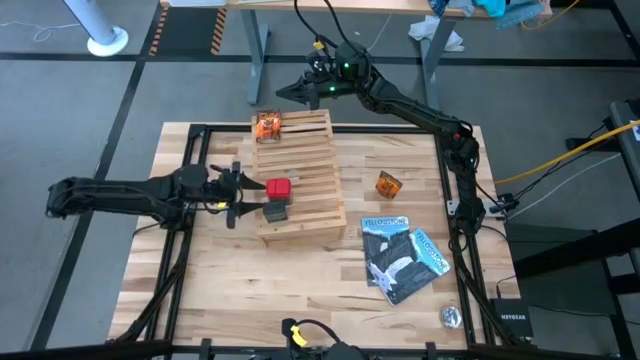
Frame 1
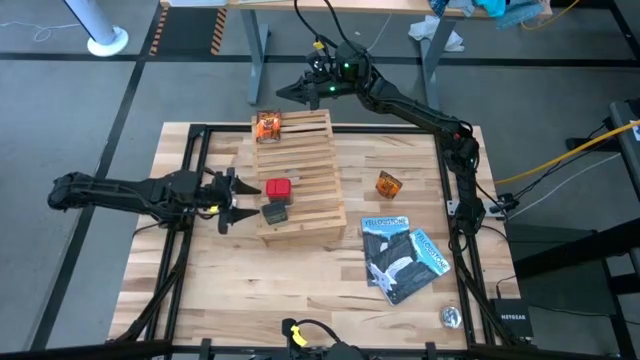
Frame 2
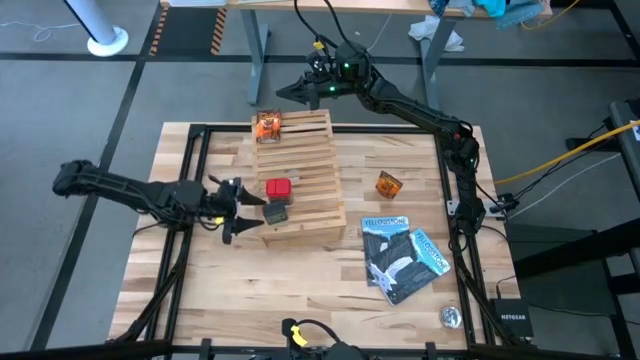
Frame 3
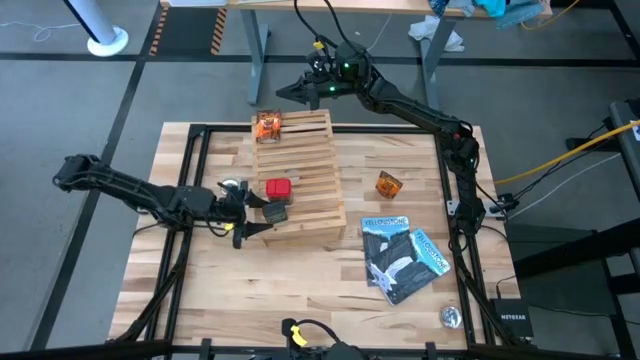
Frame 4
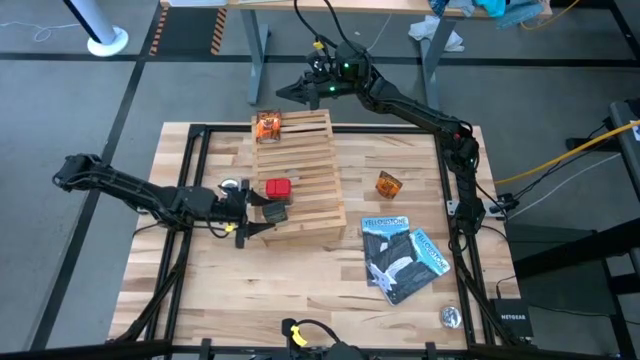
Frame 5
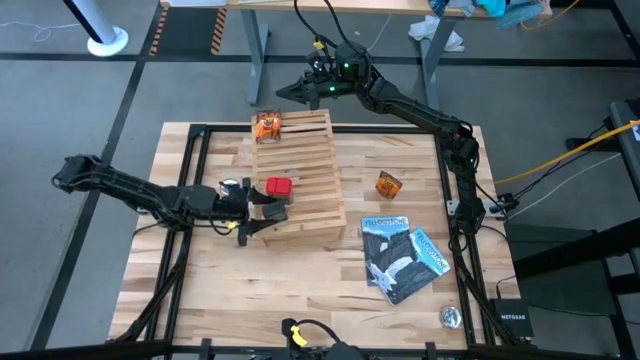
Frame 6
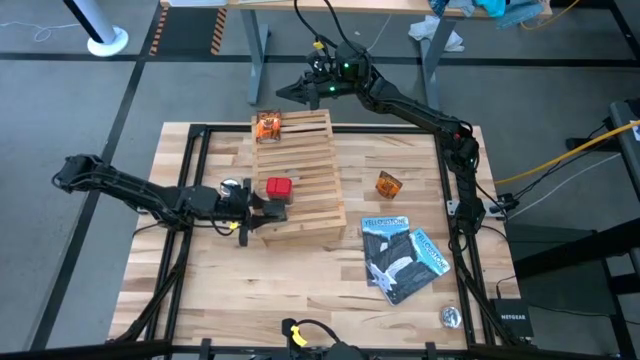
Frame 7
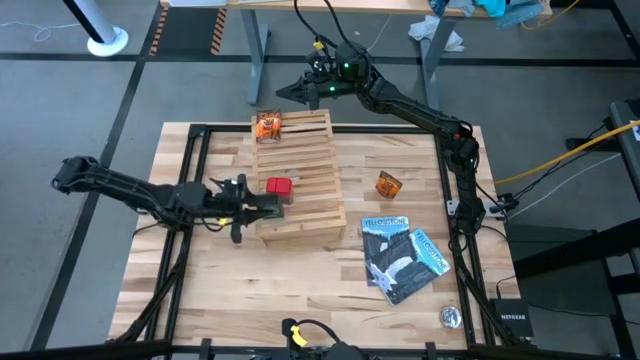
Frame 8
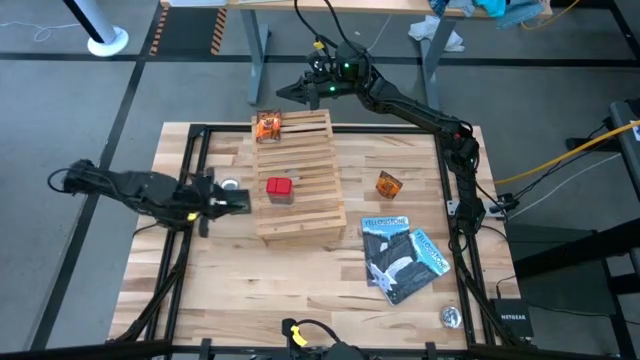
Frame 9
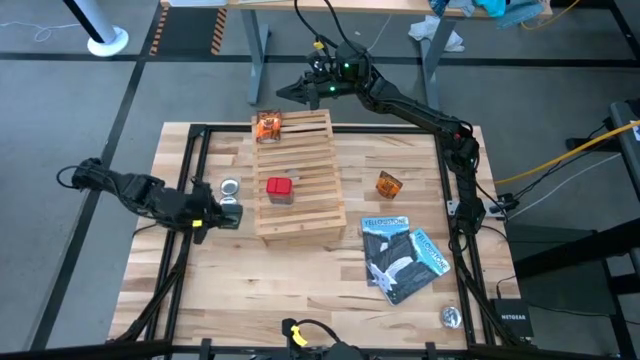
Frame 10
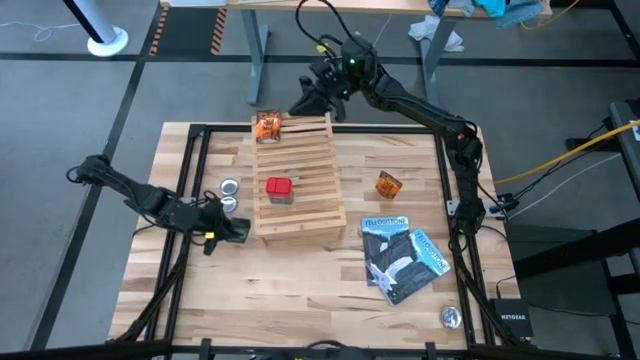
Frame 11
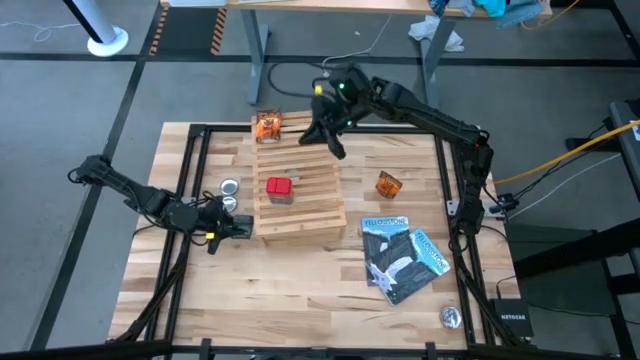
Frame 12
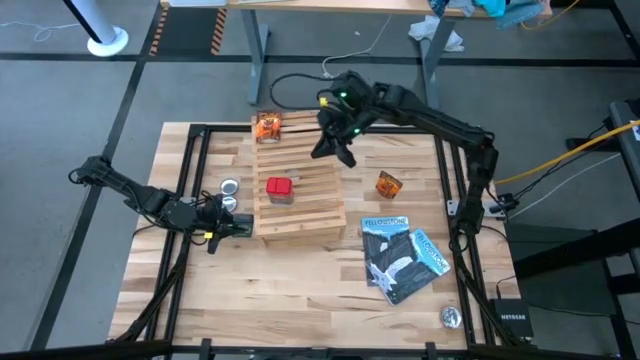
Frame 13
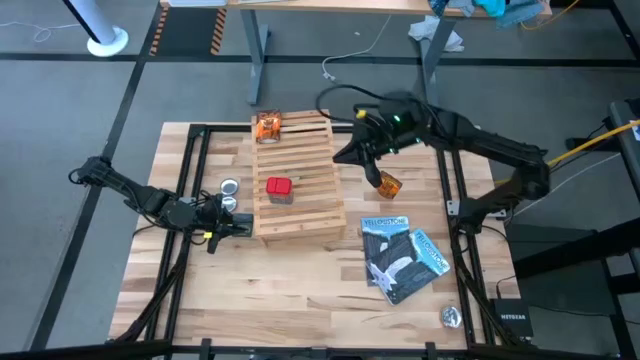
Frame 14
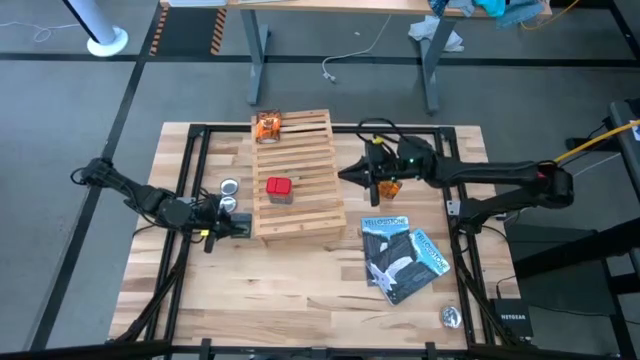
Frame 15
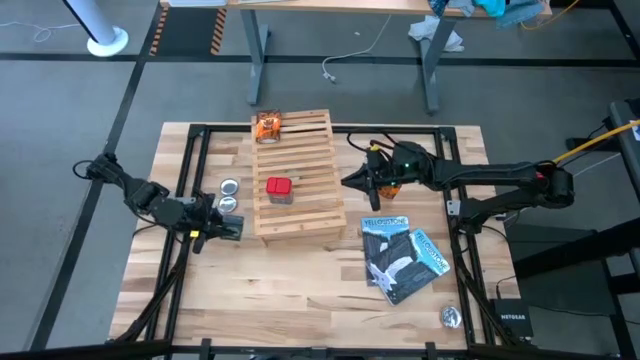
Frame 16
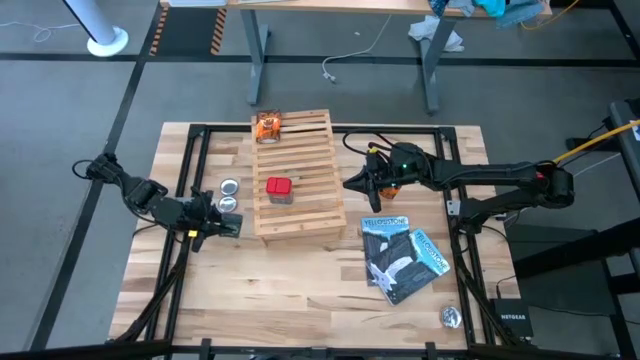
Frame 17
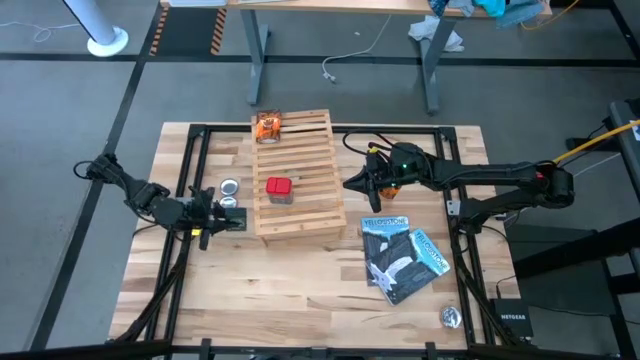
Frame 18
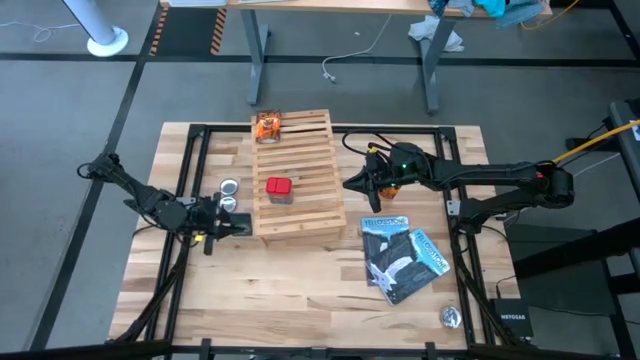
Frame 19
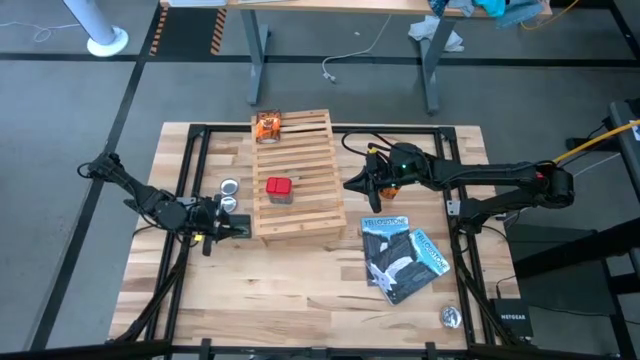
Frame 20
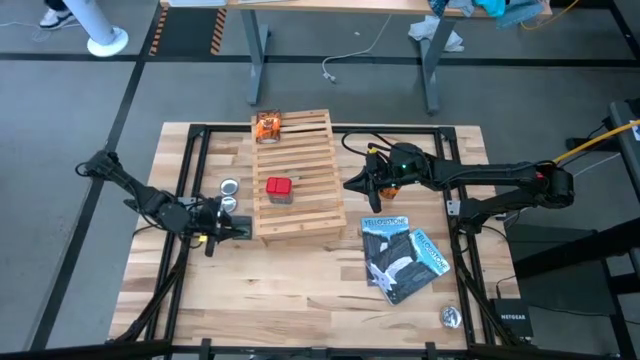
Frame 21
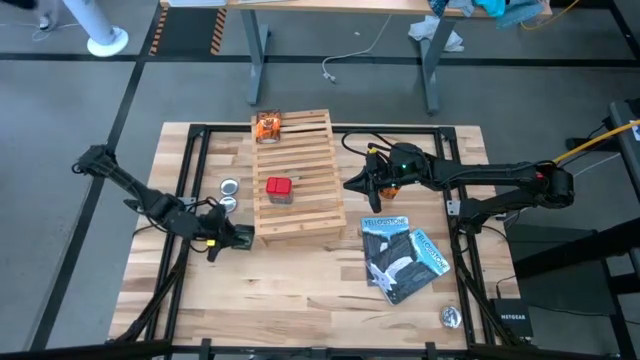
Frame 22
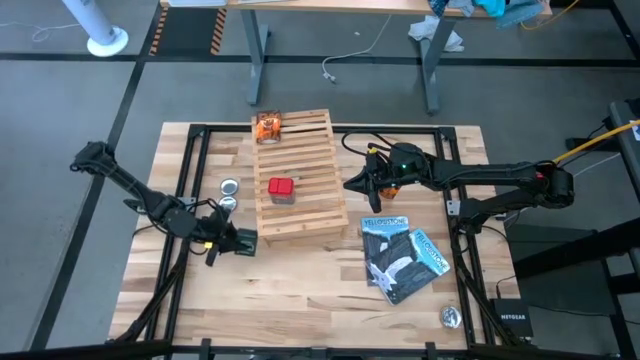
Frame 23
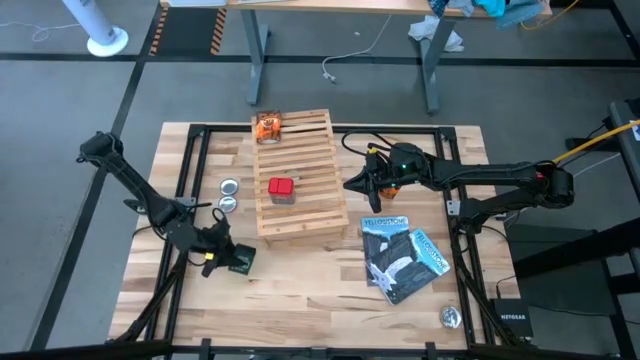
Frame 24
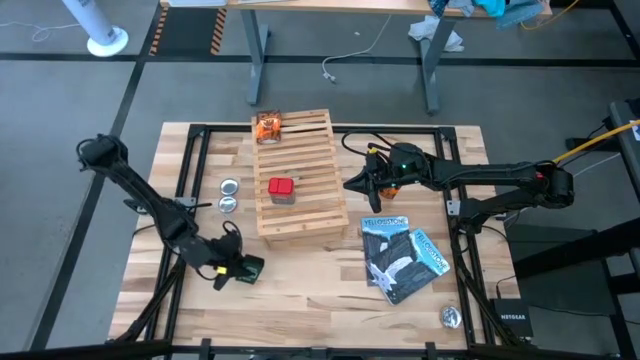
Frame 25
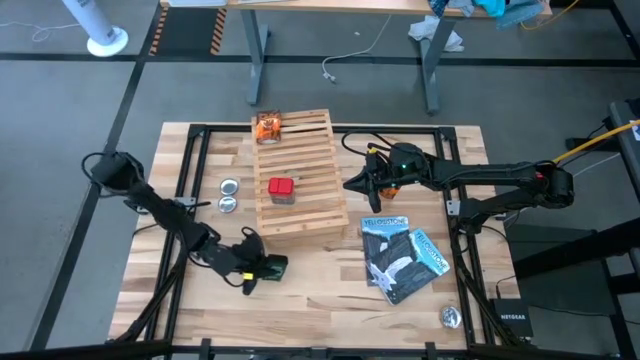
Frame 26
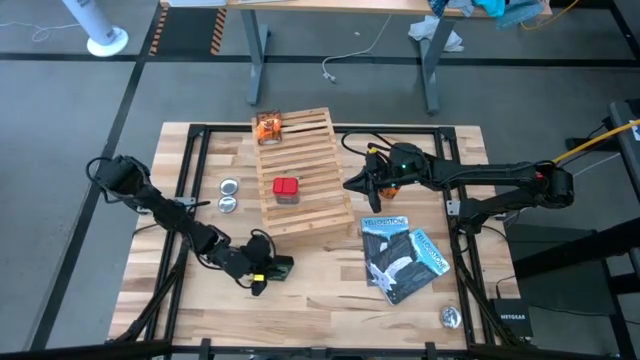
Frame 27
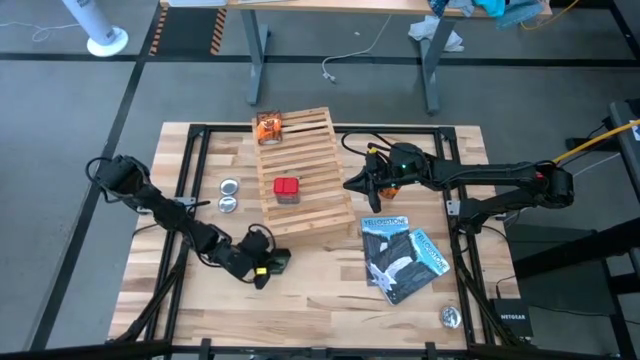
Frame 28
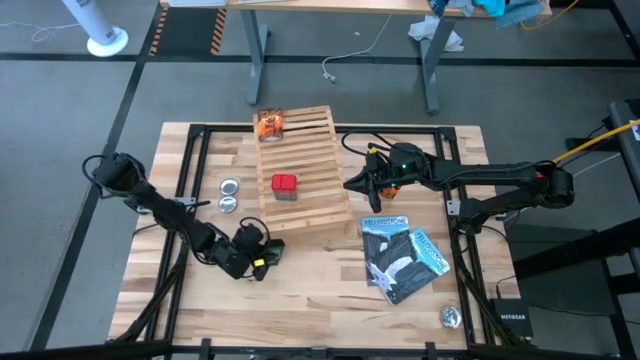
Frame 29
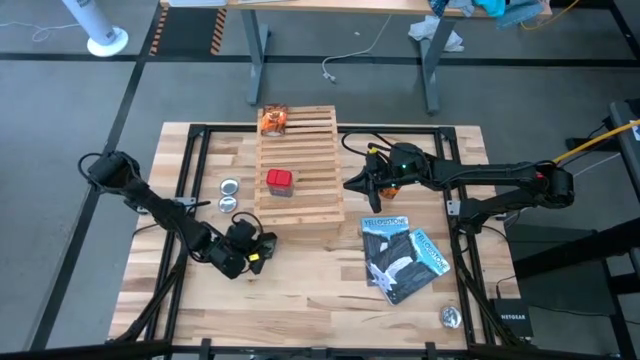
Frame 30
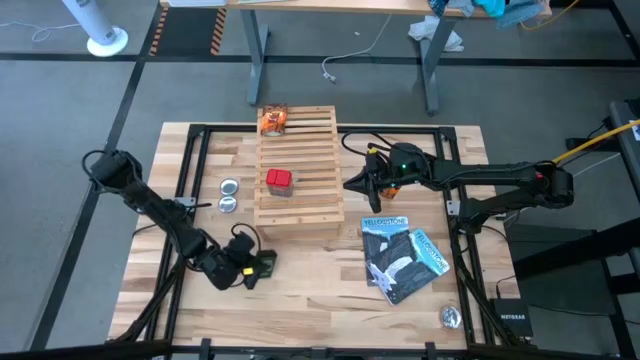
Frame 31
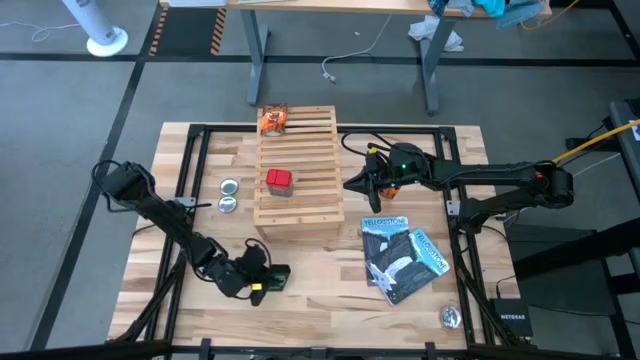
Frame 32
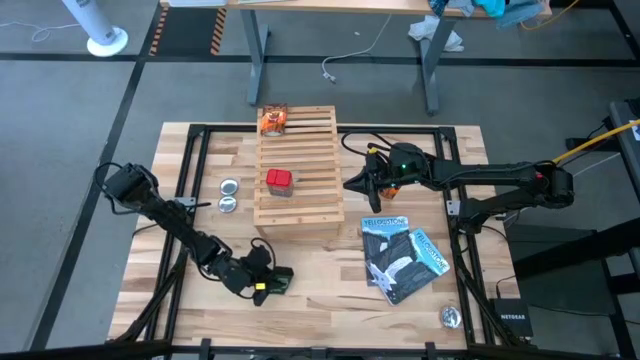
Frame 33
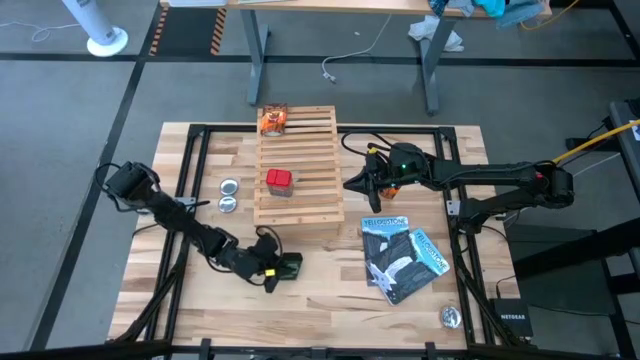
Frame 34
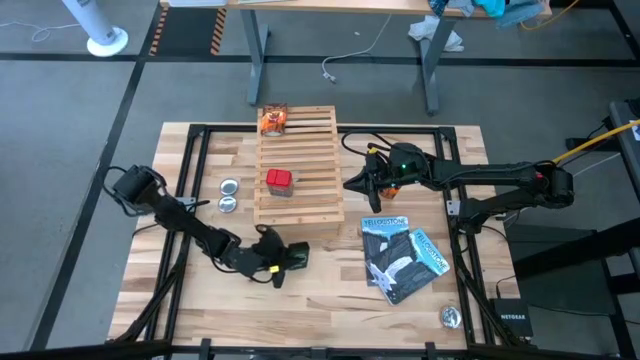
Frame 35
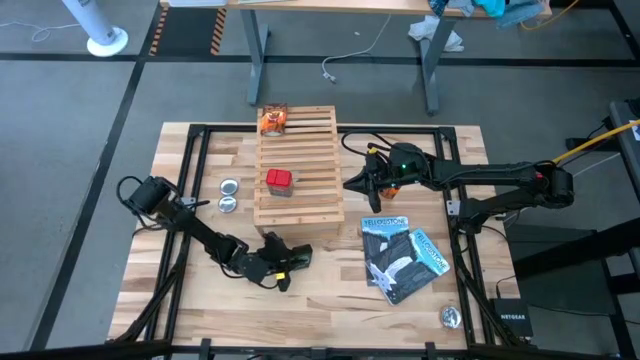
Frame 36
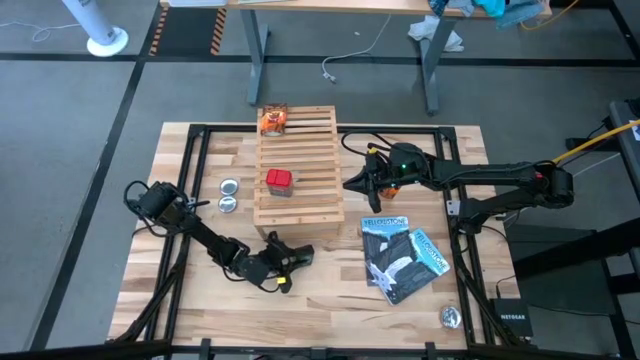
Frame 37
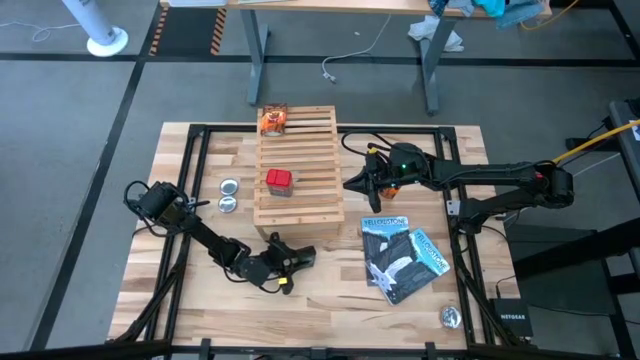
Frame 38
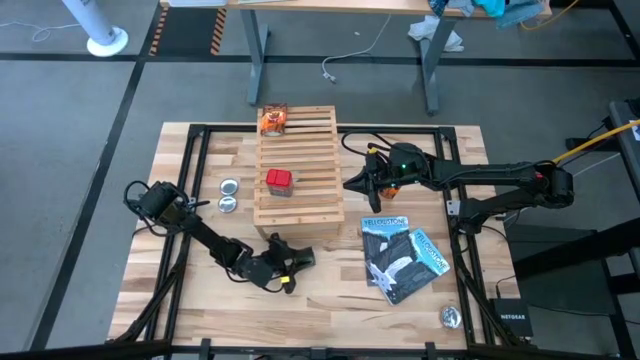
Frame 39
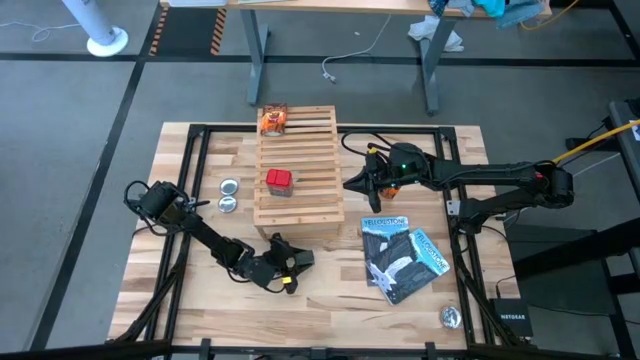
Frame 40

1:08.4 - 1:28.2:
Task: Shelf spices
Remove the black seasoning can from the shelf

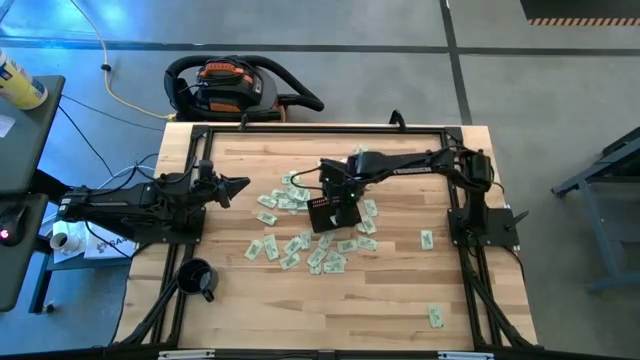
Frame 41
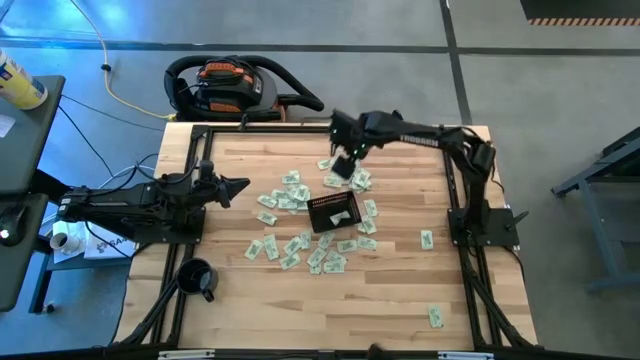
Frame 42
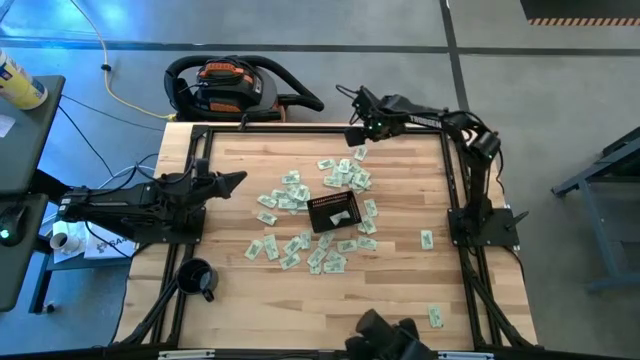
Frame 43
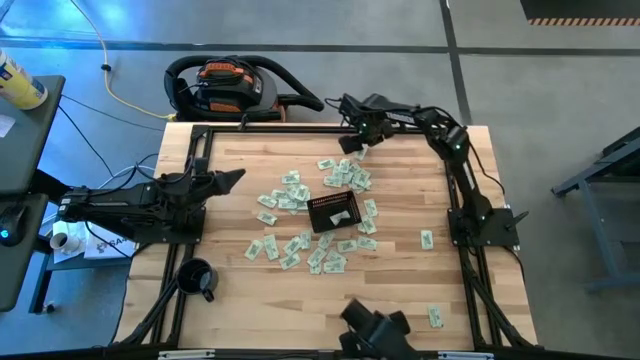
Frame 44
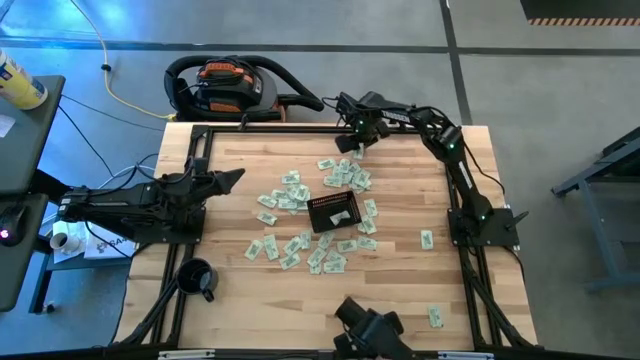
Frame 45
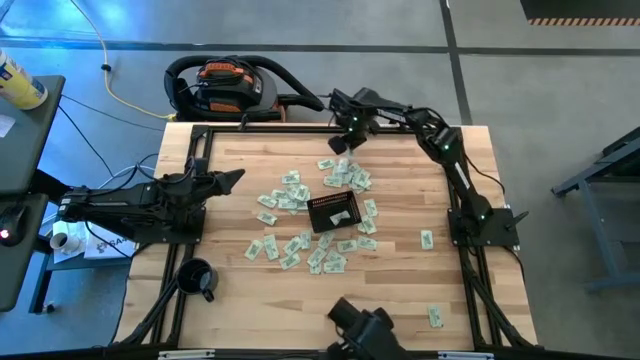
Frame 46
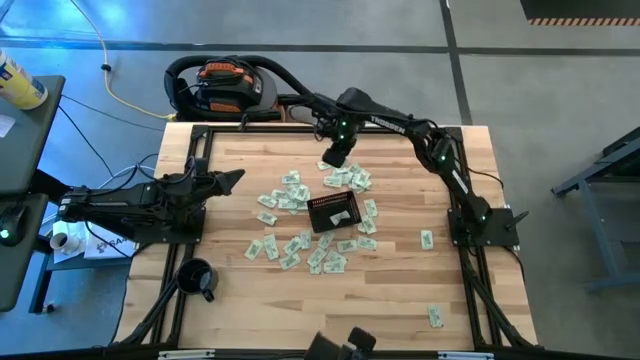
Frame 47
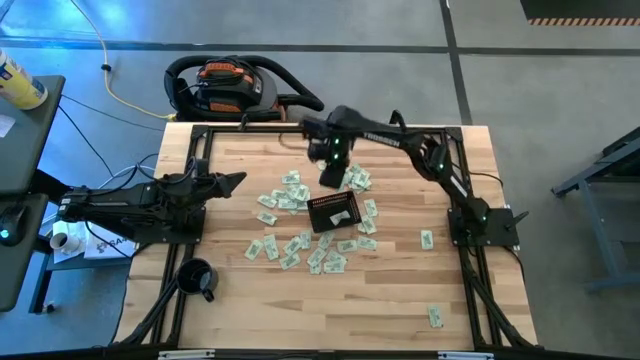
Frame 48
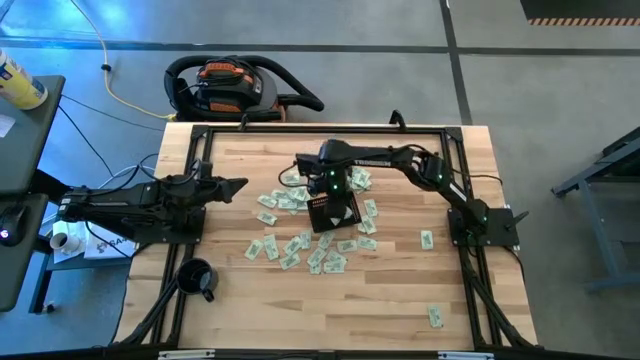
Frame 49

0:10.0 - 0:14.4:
Task: Pick and place Stevia / Truvia into bins
Put the green stevia packet into the black bin
